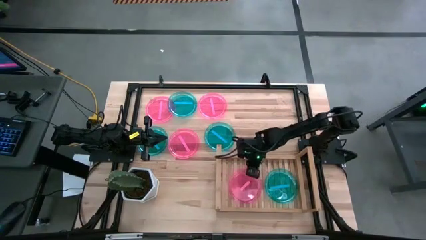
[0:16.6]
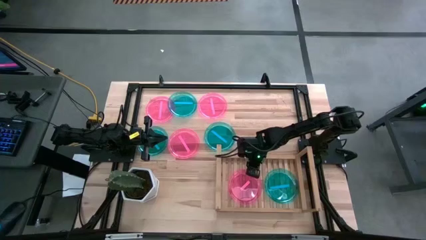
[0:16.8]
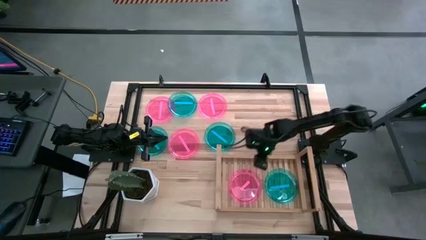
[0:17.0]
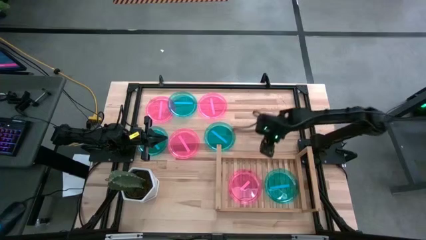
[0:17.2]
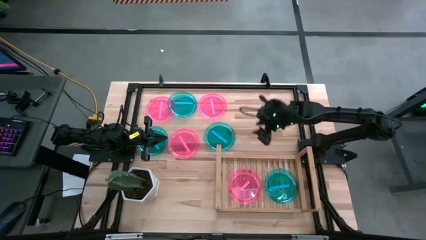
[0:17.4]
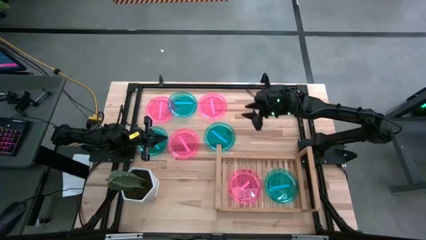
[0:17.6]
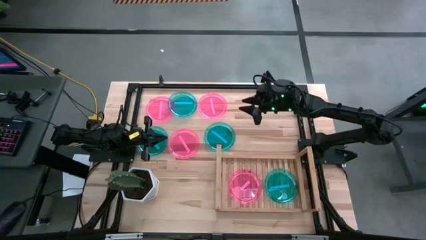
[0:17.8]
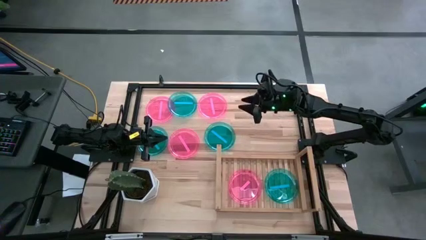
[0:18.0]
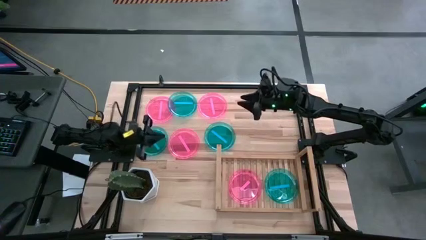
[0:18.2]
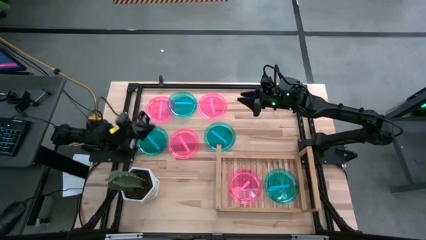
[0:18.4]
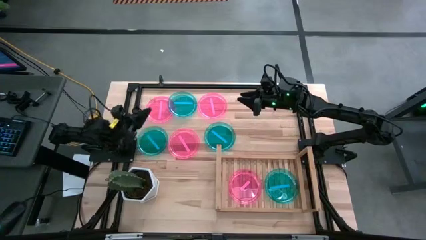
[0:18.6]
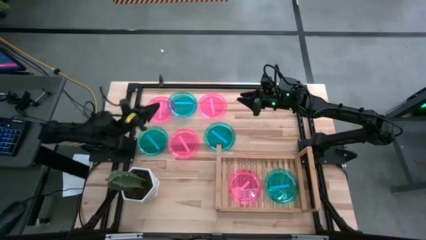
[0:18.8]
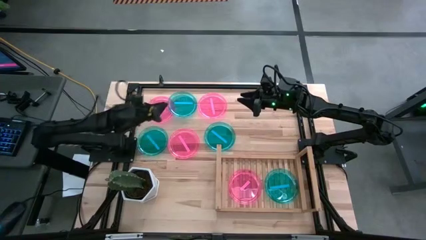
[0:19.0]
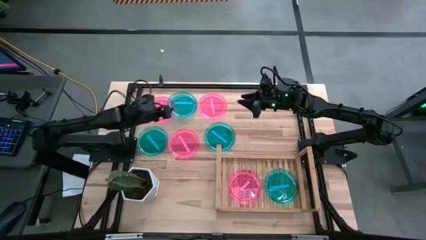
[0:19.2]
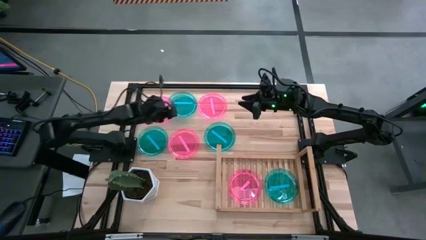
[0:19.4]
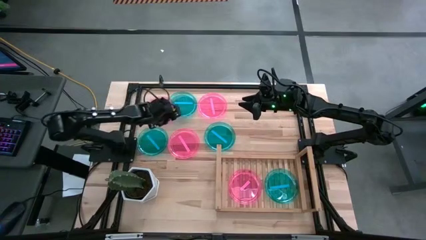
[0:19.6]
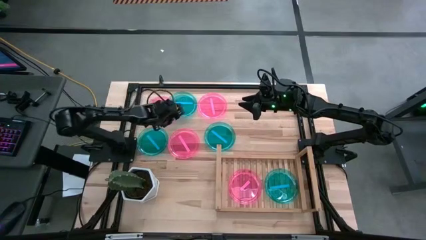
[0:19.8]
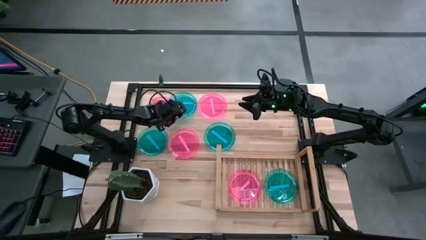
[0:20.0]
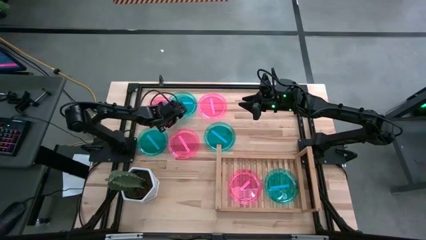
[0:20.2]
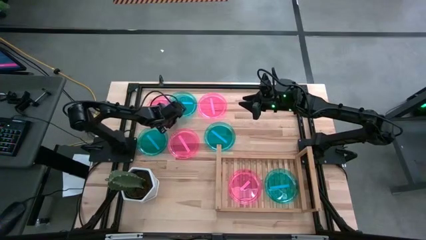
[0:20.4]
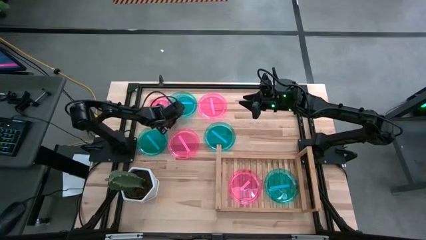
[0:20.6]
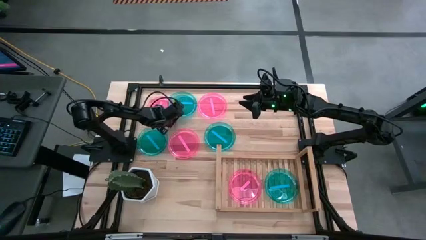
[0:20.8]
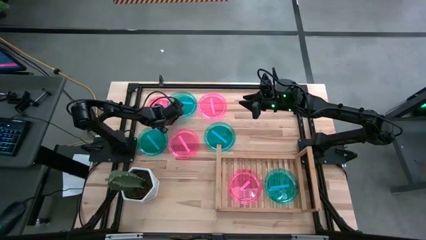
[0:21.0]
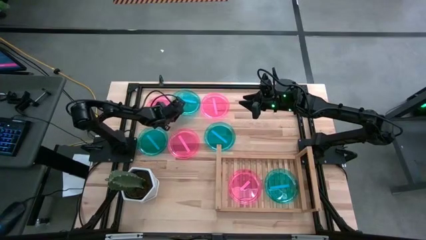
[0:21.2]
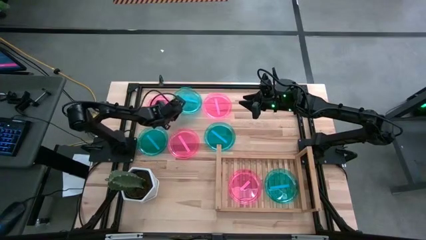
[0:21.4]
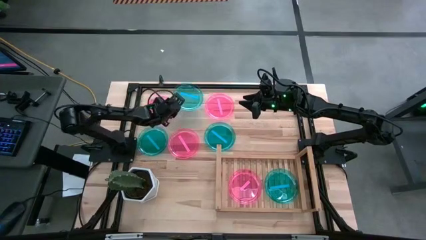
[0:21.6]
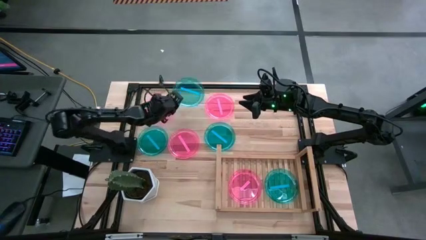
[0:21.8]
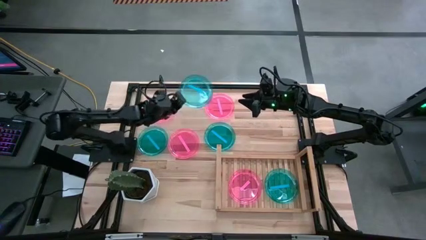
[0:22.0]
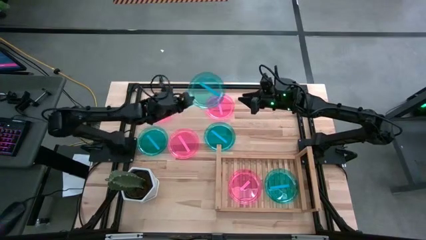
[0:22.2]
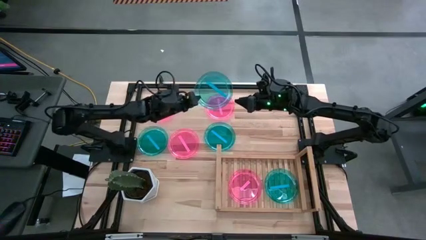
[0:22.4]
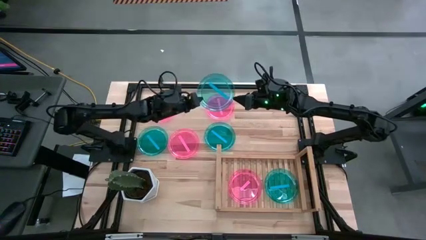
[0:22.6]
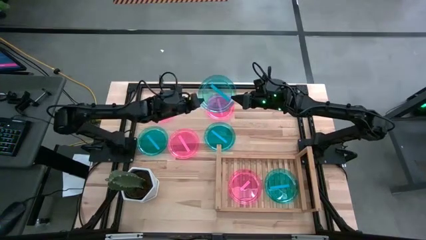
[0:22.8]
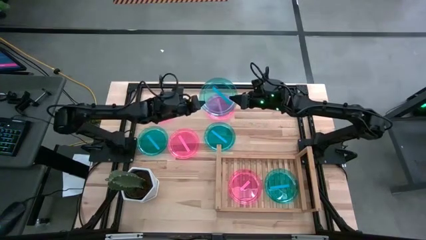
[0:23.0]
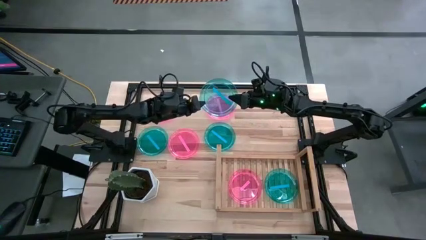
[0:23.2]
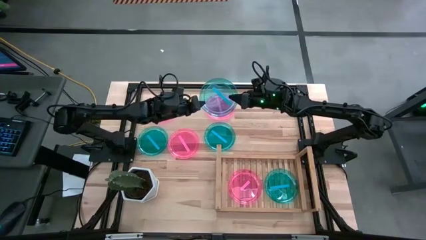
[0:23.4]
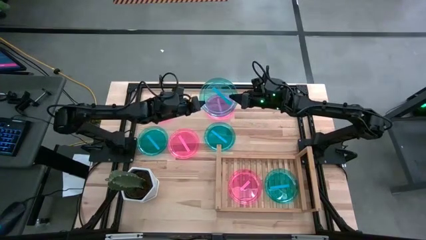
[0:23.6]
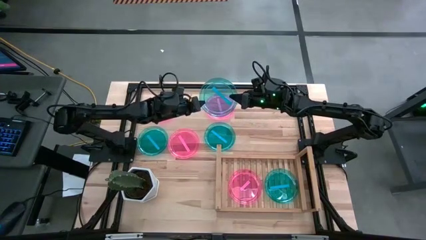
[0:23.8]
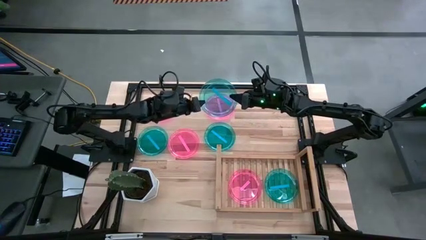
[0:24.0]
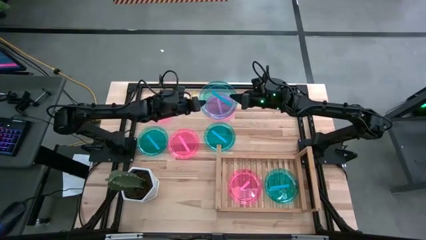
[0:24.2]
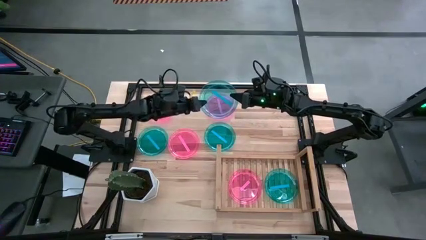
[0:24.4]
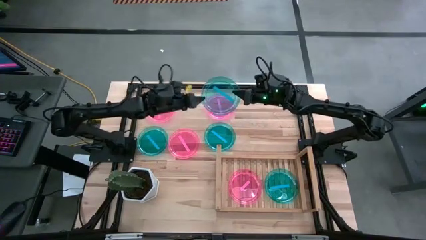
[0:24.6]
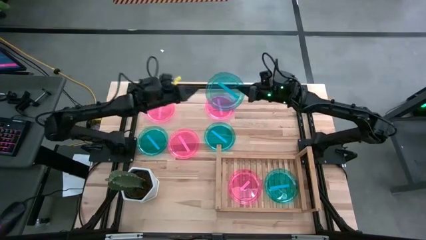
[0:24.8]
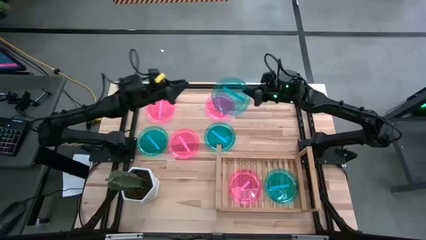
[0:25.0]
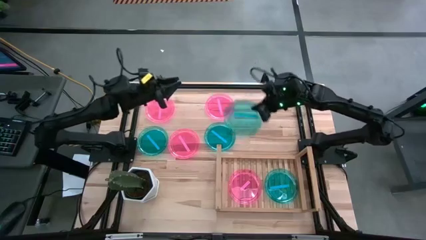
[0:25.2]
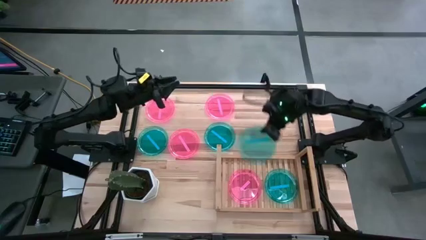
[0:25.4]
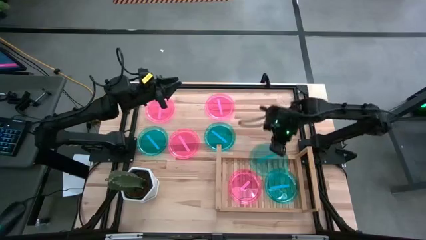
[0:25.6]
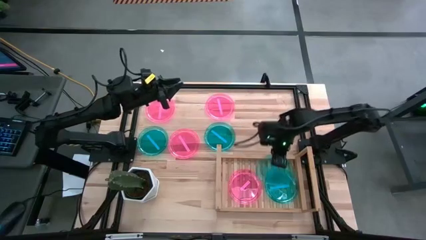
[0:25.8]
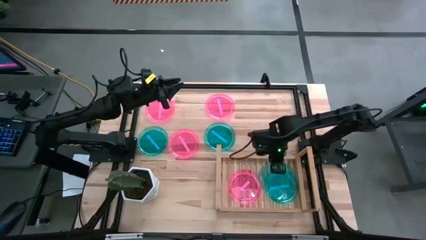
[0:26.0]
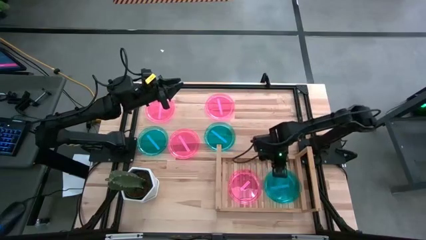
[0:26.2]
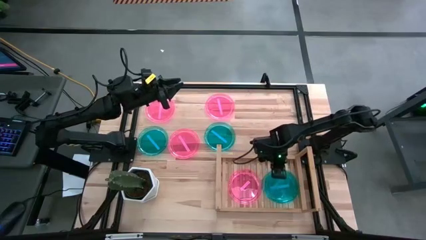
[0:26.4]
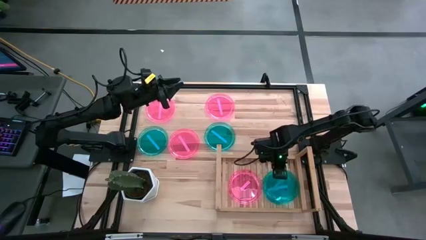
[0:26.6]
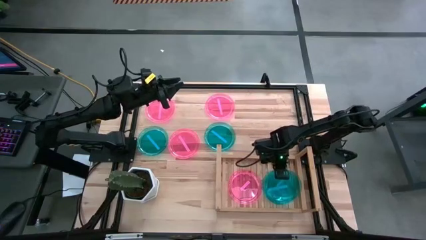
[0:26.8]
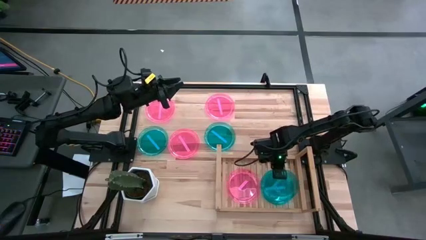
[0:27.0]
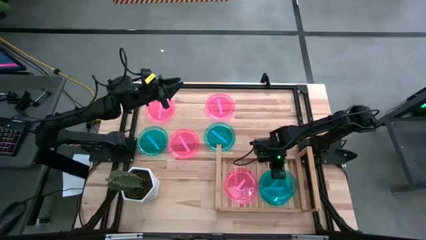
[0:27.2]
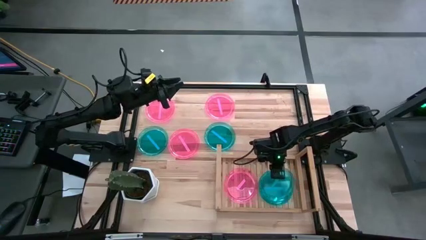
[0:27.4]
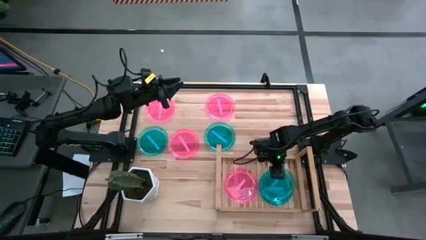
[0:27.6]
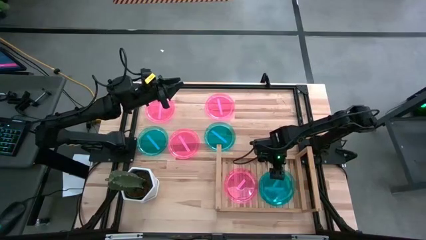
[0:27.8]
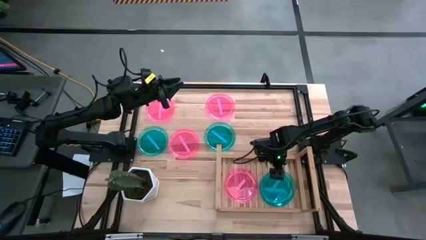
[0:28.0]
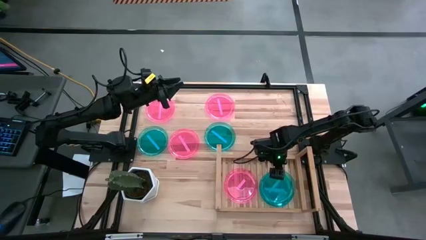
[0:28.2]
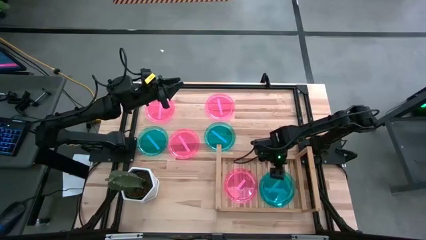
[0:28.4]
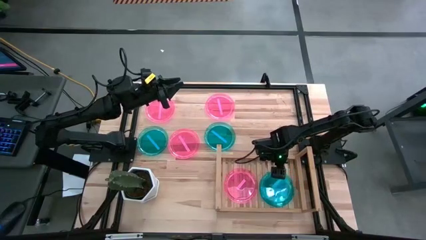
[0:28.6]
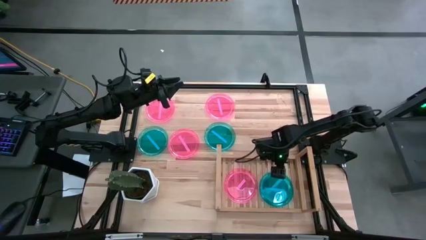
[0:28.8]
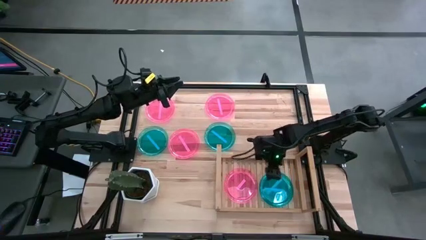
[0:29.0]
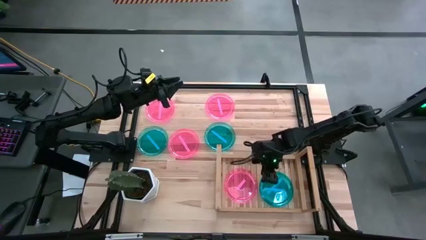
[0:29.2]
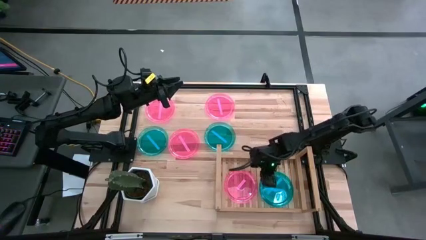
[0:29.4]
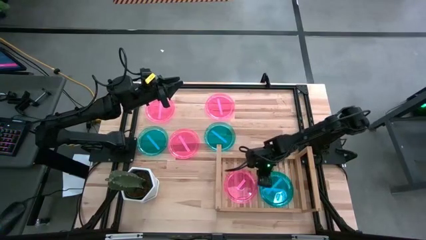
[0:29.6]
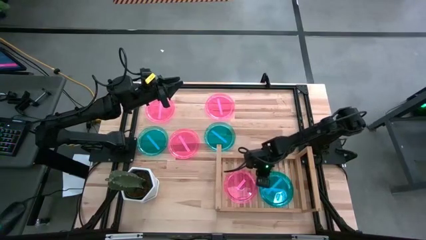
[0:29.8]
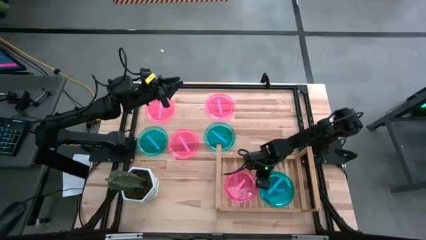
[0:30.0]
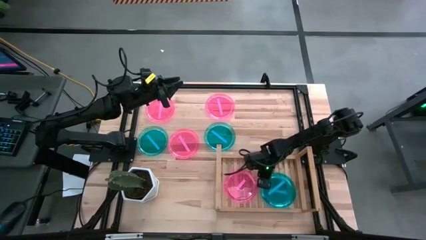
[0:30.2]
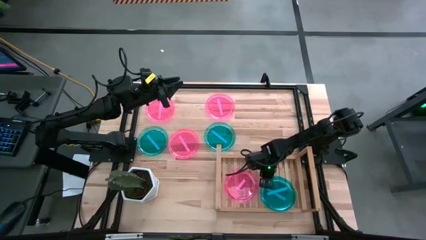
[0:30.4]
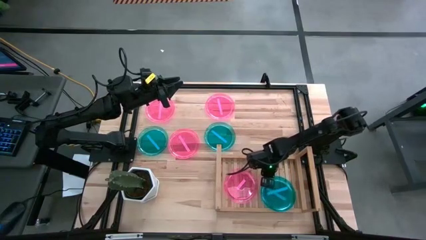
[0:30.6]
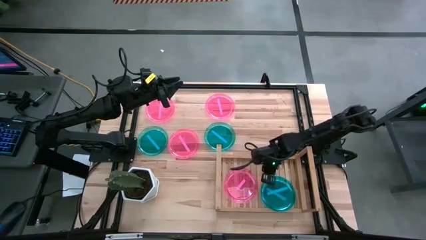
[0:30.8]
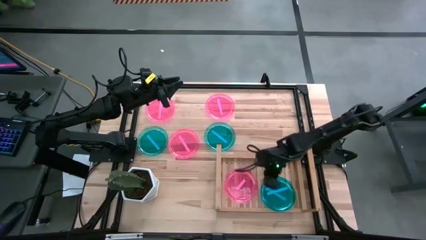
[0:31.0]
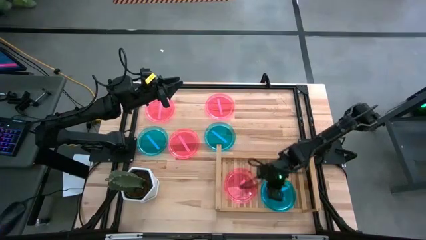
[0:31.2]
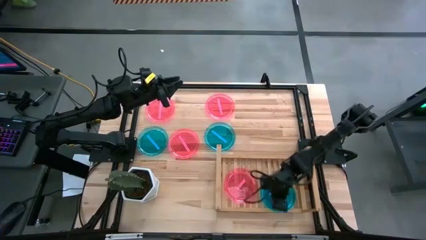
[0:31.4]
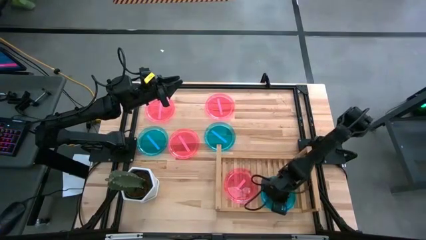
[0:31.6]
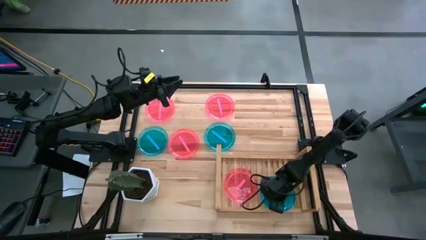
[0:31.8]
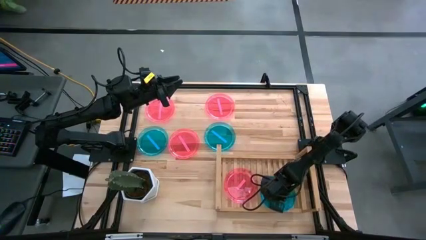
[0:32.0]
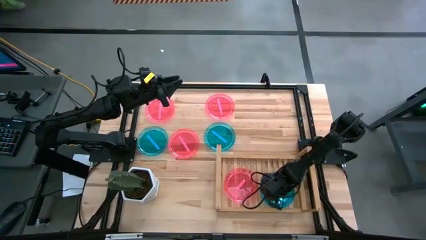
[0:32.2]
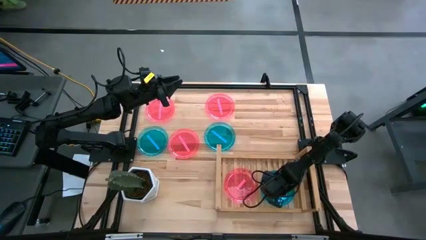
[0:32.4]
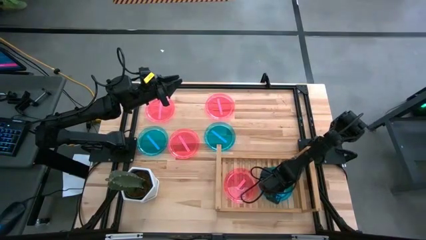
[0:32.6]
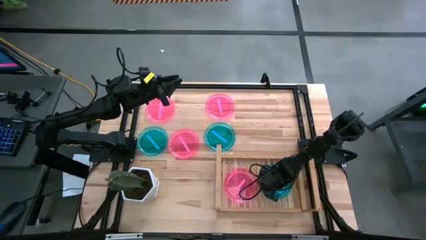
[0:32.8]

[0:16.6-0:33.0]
Task: Place and stack plates onto a shelf
Stack the blue plate on top of the blue plate on the shelf
